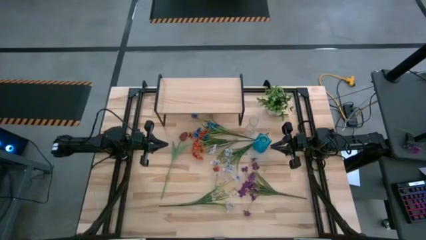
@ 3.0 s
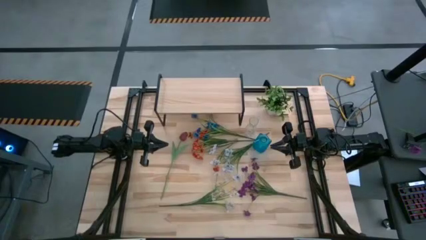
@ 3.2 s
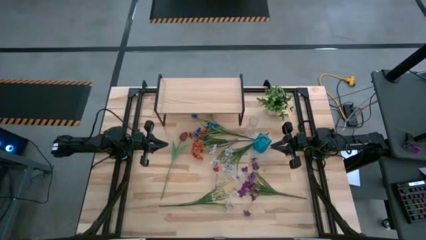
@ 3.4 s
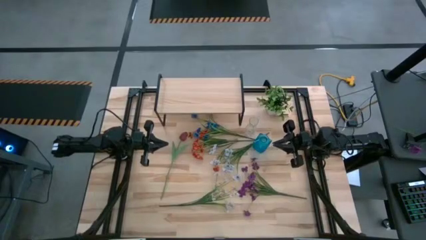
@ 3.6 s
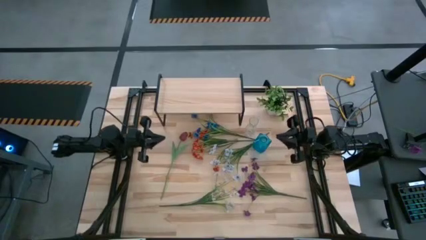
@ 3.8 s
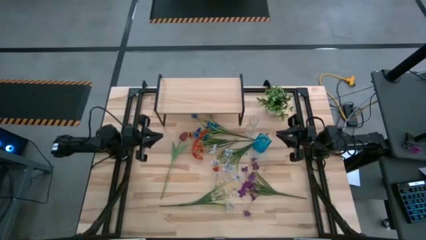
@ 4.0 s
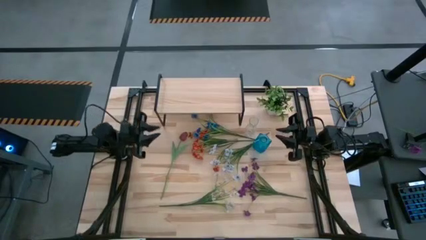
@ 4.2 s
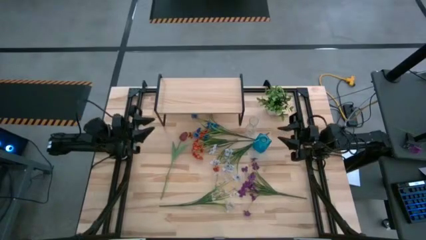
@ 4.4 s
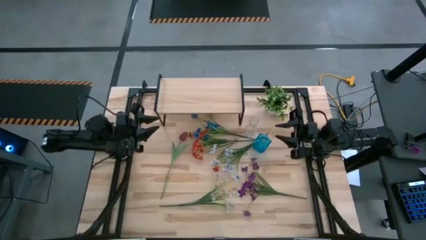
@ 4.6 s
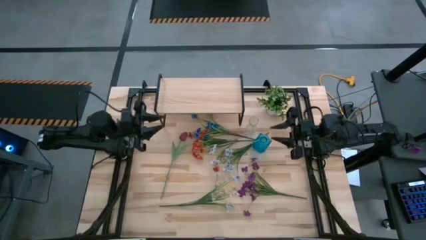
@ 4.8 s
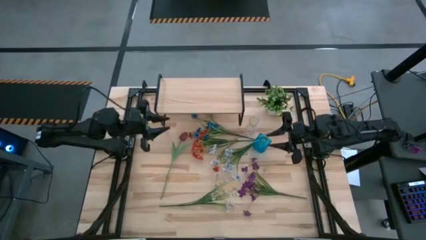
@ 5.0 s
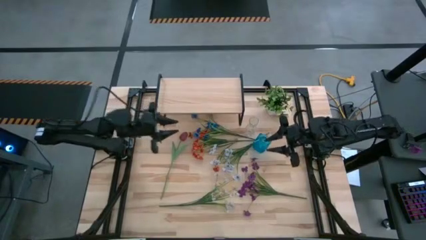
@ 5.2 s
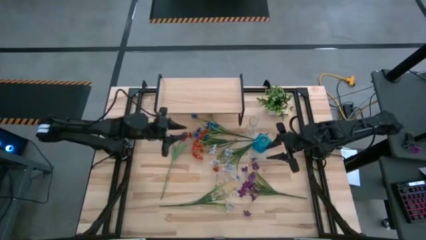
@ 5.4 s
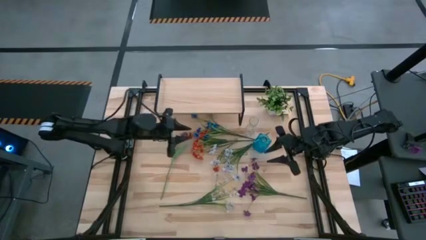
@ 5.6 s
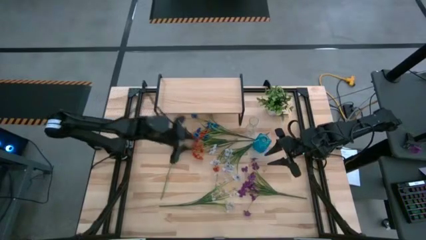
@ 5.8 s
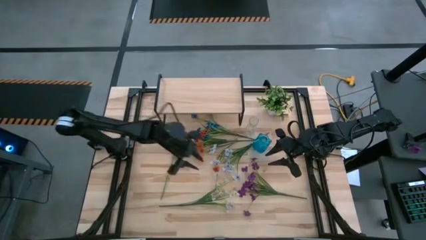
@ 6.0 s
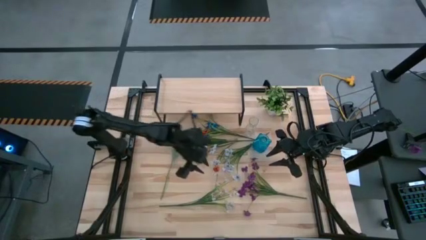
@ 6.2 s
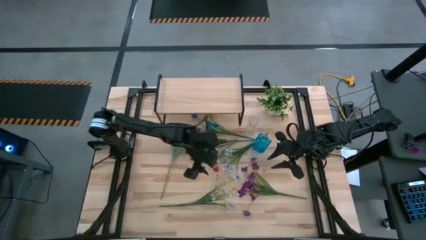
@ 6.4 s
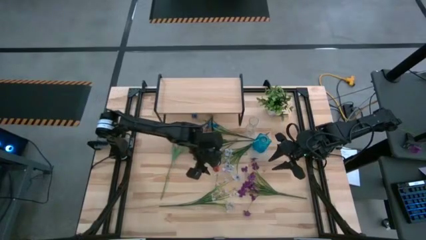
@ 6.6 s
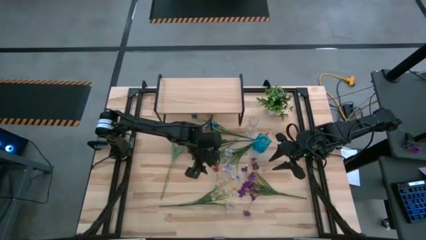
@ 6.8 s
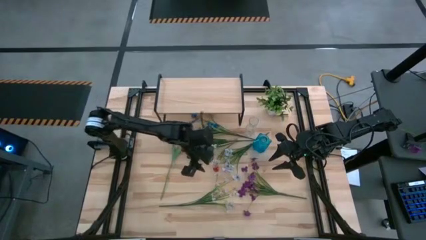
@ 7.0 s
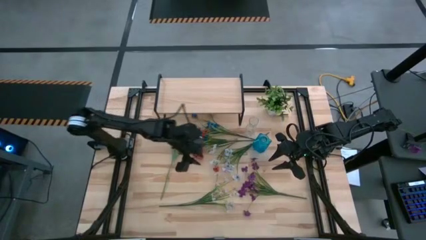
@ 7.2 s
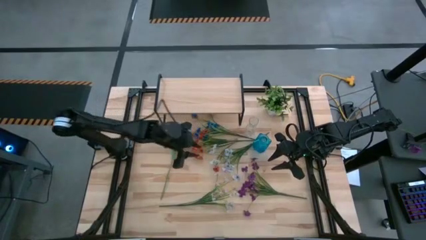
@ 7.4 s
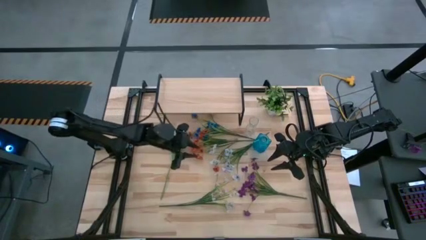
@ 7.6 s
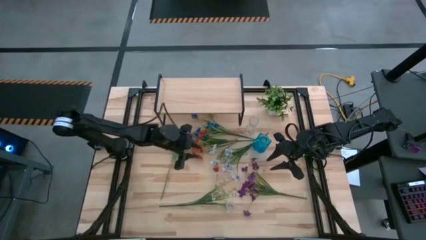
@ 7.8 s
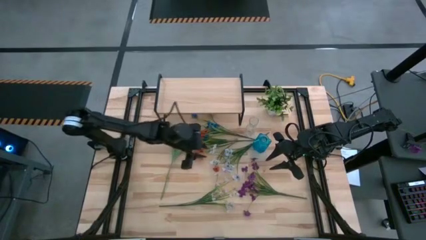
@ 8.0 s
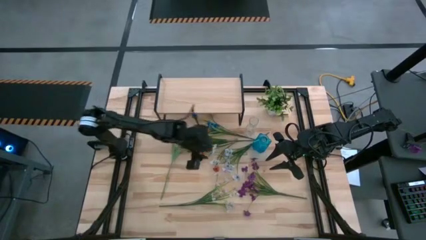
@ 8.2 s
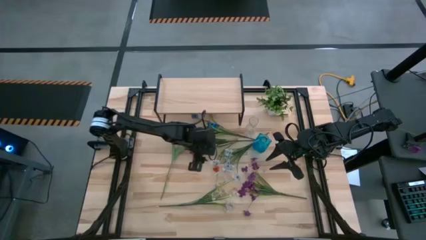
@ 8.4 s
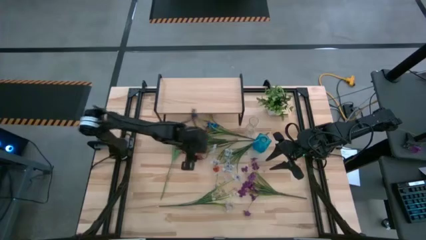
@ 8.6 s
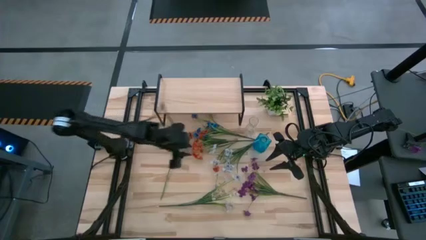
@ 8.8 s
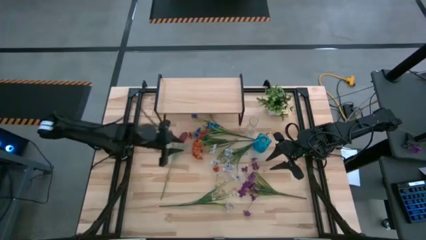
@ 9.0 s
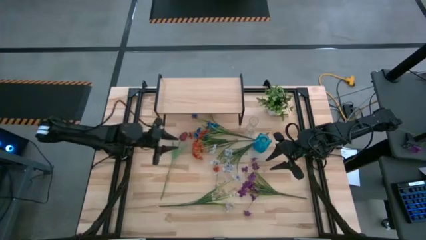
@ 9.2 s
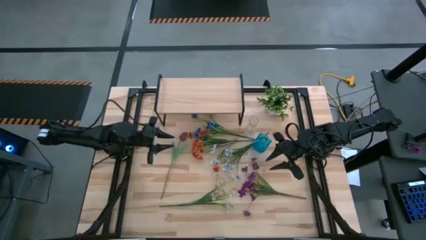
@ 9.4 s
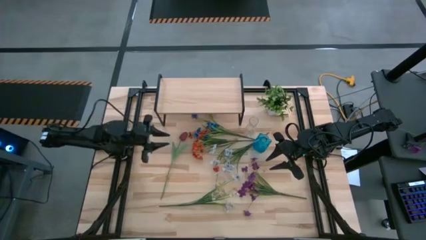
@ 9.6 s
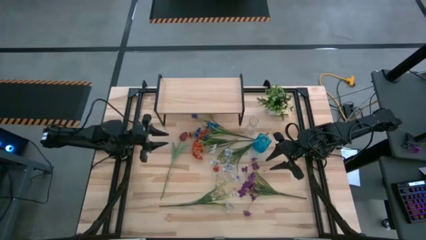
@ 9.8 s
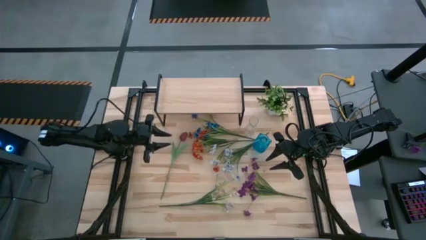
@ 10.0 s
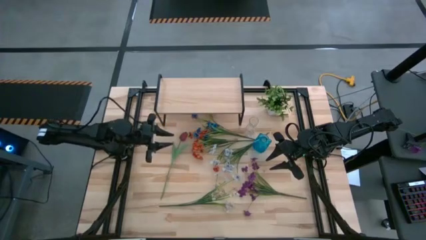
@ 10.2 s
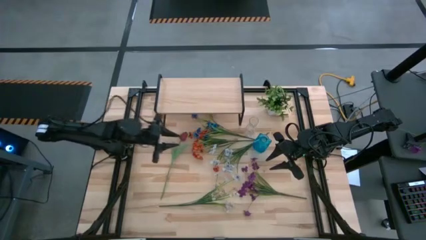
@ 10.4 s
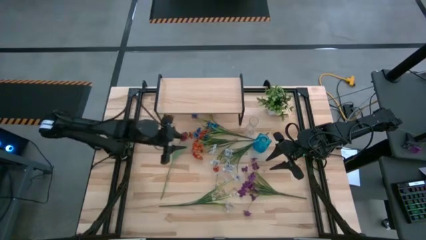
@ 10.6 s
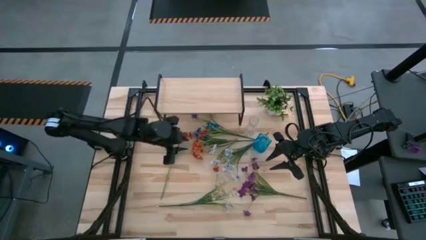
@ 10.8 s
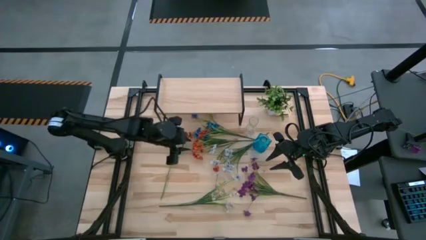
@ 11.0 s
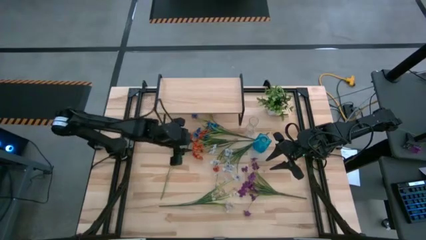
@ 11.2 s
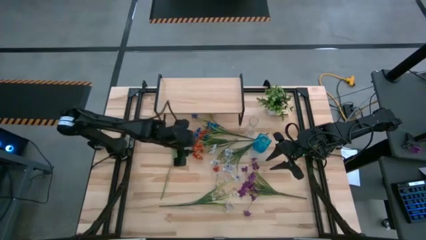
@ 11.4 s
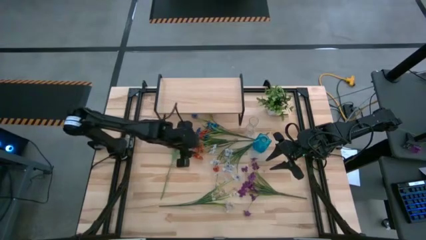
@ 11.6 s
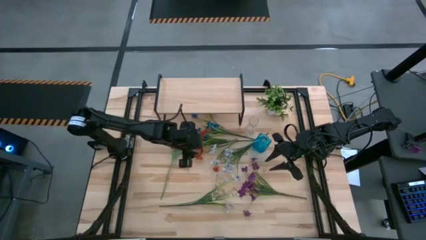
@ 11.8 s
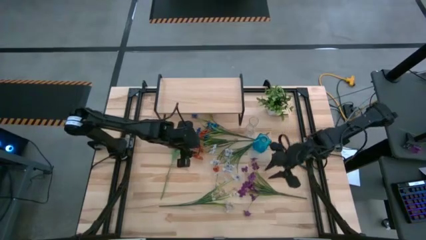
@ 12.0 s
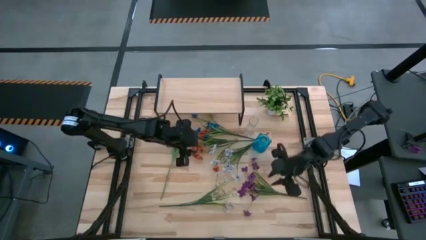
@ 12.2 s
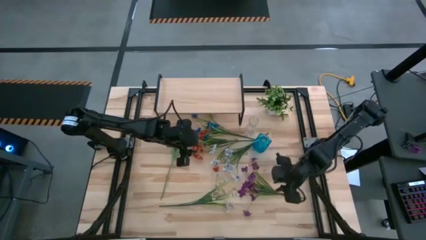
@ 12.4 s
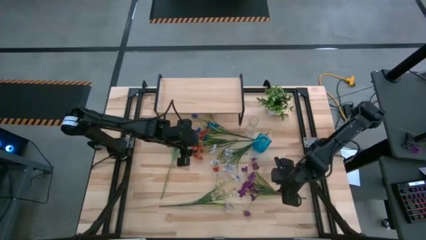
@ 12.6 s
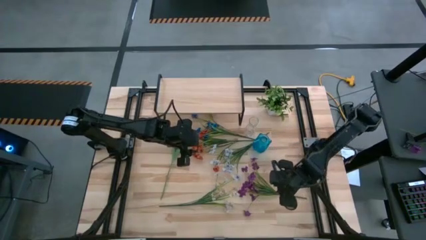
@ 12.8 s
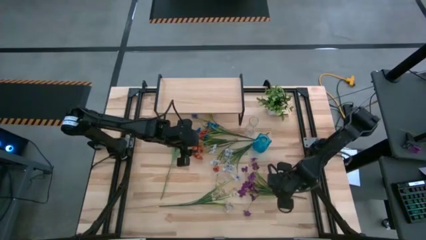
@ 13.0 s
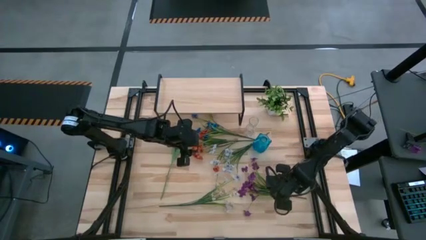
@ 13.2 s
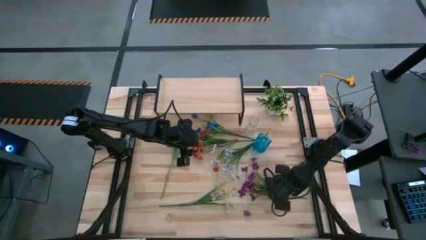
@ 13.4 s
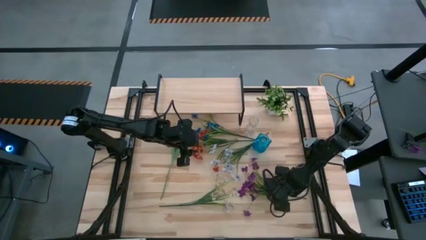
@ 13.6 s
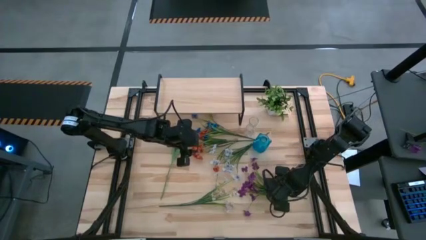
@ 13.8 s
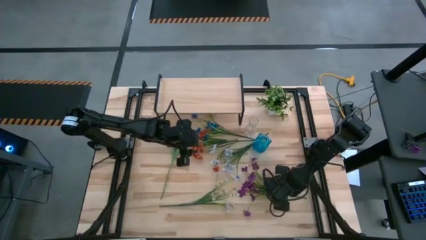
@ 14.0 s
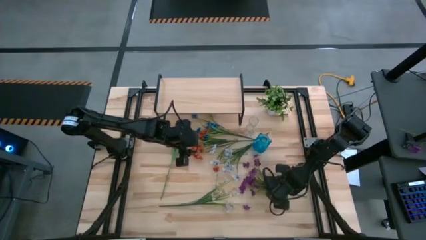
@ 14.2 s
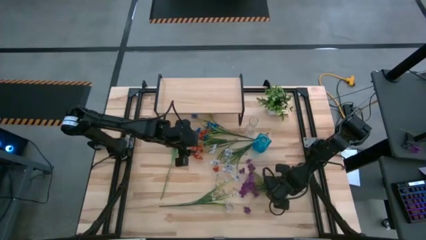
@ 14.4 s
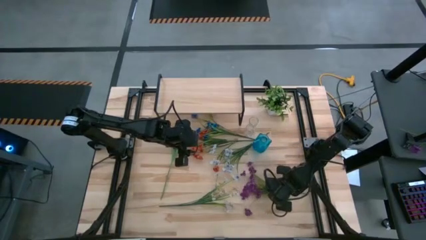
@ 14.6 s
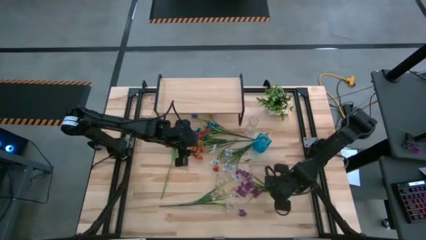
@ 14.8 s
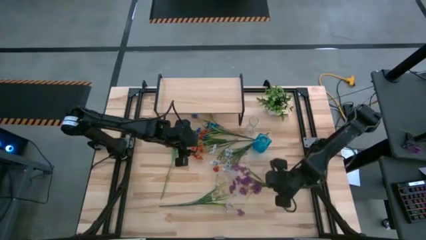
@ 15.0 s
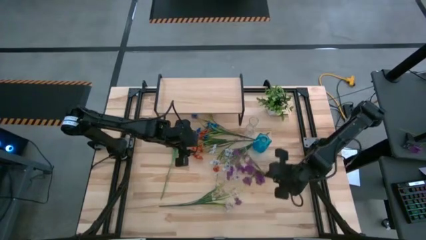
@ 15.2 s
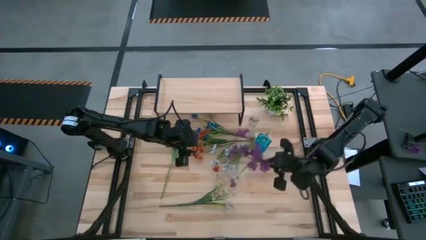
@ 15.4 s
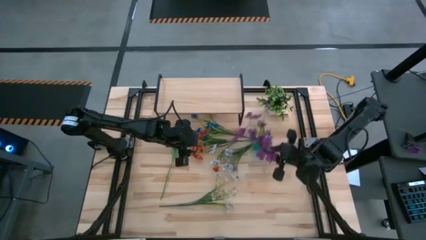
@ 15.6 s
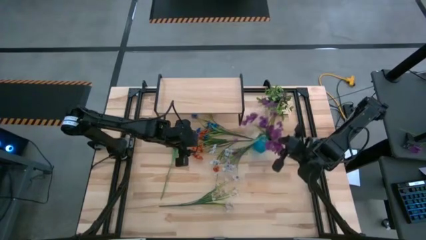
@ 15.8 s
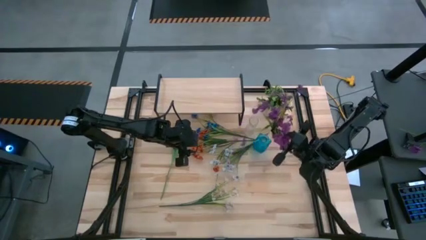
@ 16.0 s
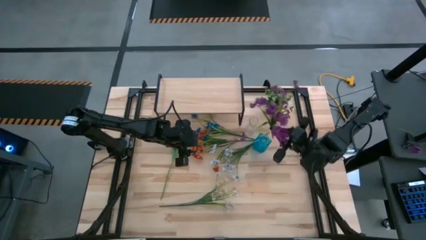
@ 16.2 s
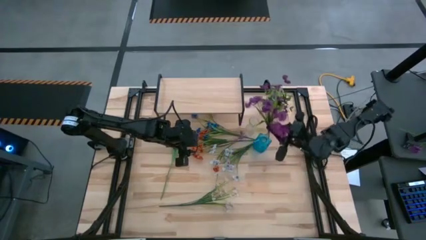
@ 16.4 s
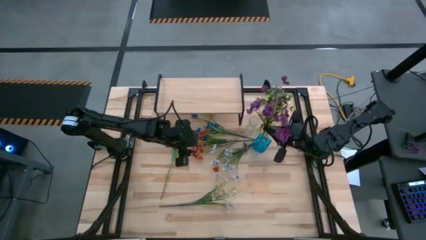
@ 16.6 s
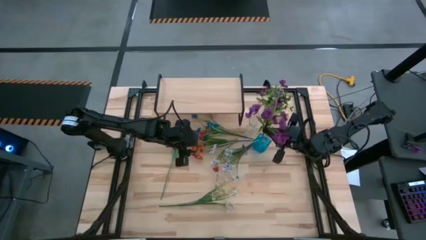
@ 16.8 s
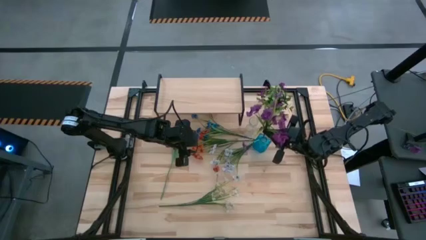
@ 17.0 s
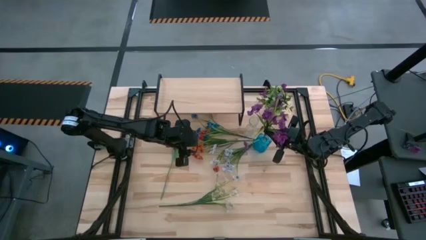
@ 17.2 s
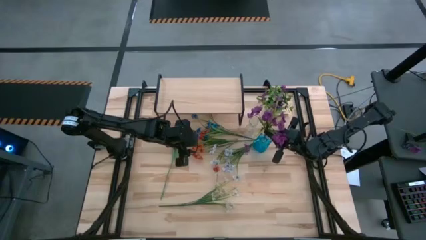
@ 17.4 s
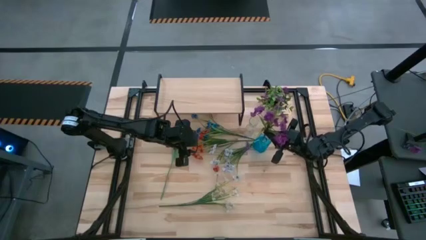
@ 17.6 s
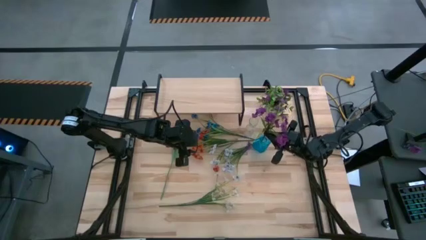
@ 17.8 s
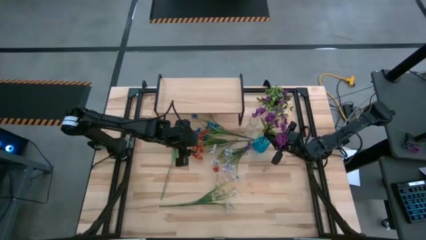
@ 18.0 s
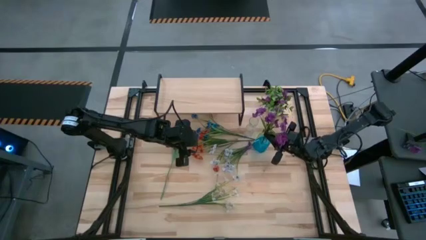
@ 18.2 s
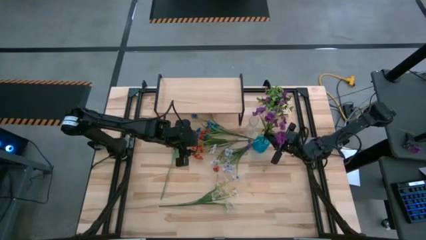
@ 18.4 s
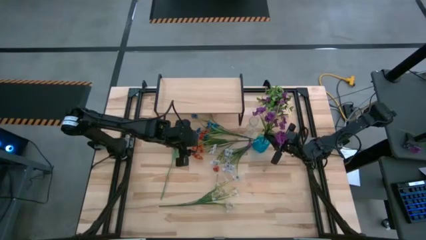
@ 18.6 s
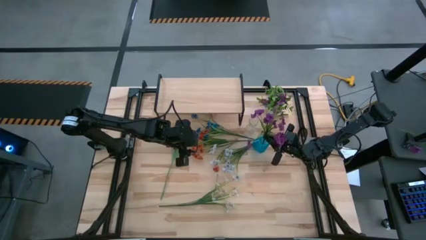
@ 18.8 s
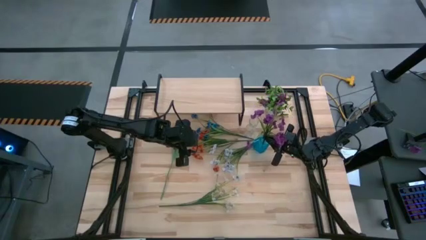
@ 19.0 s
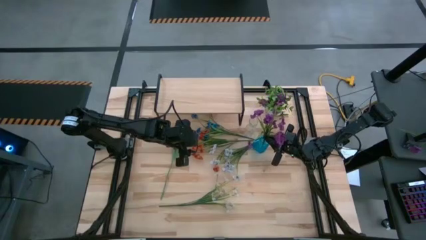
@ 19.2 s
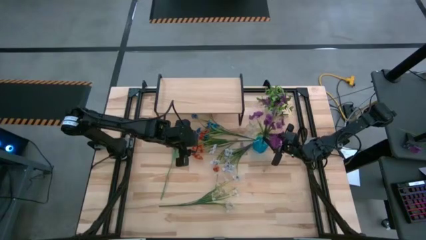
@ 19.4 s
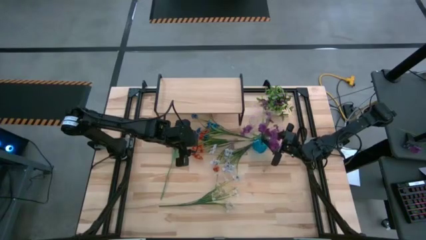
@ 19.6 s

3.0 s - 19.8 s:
Task: Pick and place flowers into a vace then onto a shelf
Put the purple flowers into the blue flower vase
